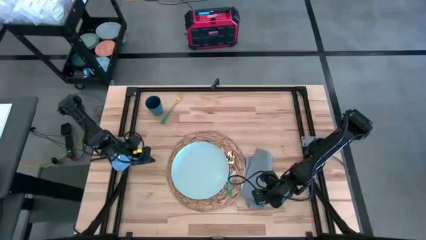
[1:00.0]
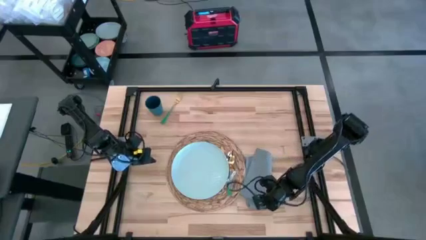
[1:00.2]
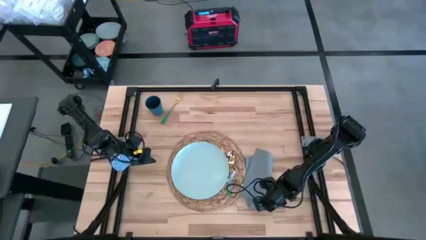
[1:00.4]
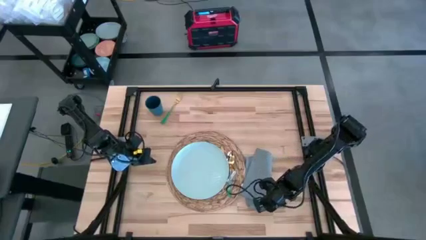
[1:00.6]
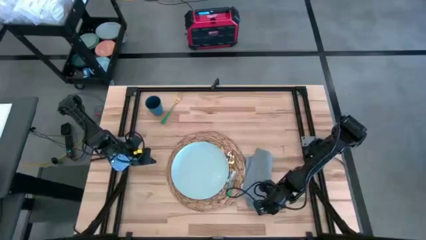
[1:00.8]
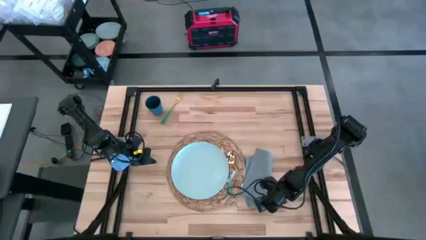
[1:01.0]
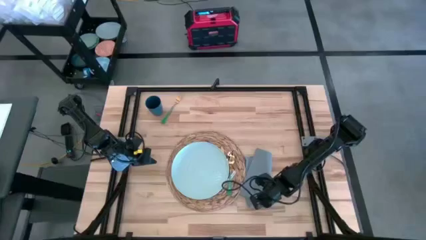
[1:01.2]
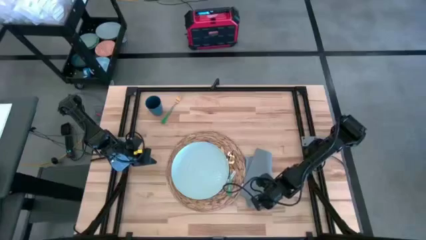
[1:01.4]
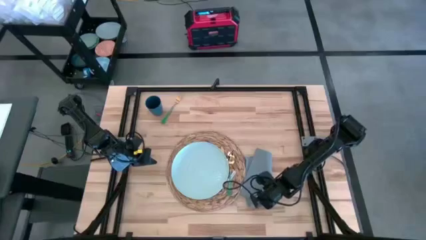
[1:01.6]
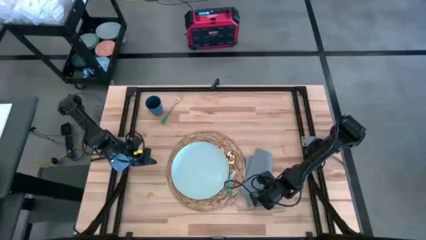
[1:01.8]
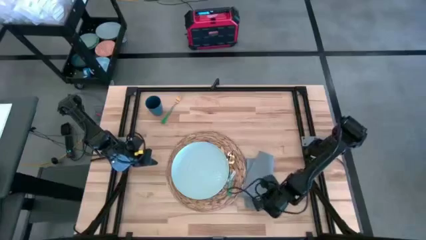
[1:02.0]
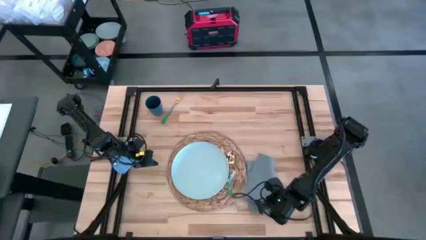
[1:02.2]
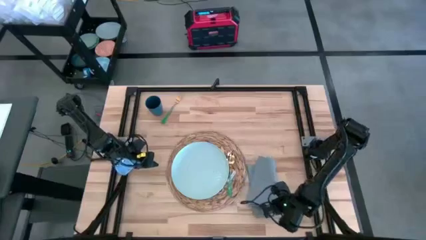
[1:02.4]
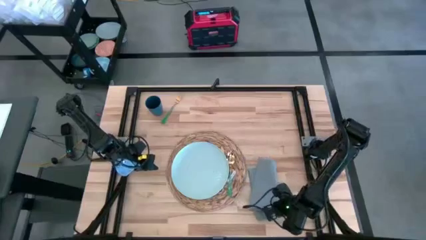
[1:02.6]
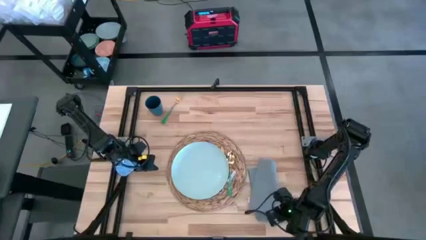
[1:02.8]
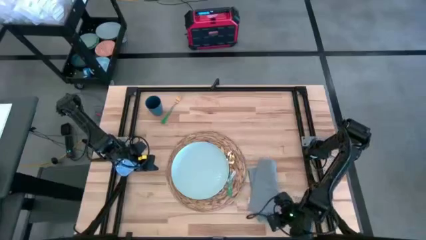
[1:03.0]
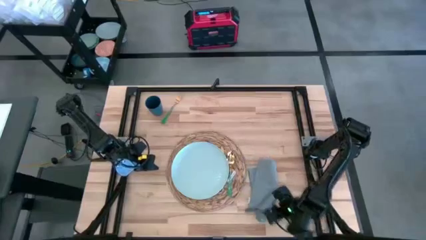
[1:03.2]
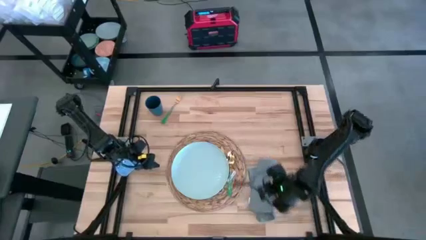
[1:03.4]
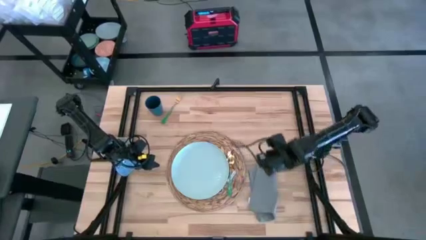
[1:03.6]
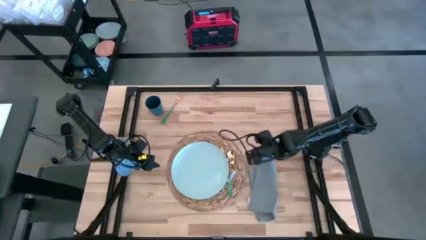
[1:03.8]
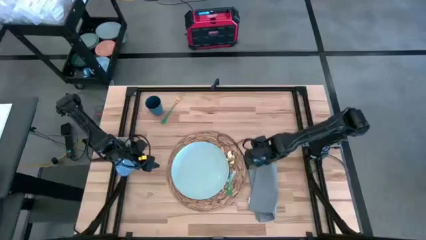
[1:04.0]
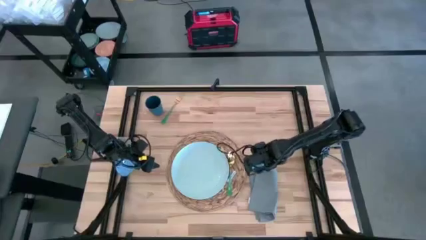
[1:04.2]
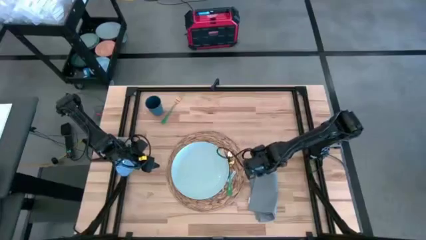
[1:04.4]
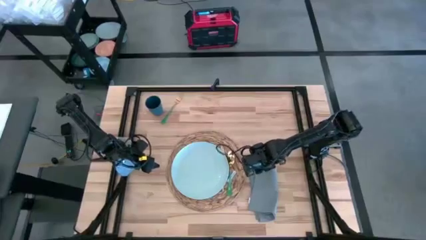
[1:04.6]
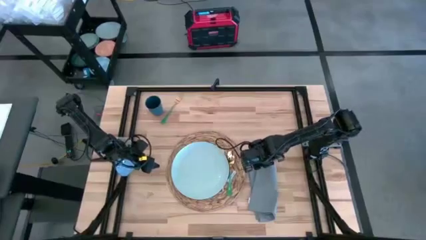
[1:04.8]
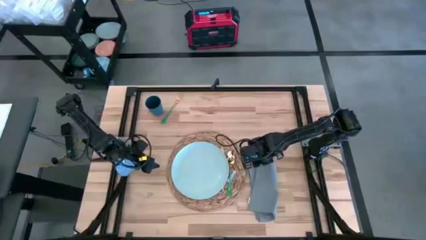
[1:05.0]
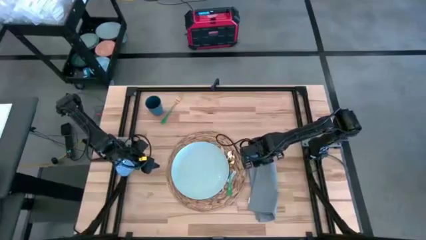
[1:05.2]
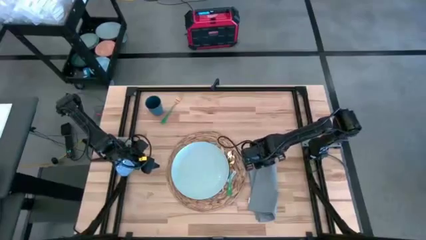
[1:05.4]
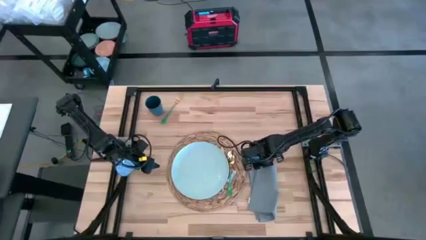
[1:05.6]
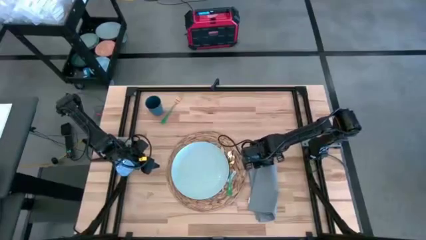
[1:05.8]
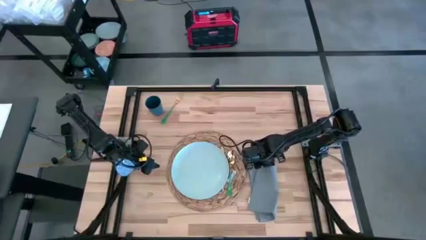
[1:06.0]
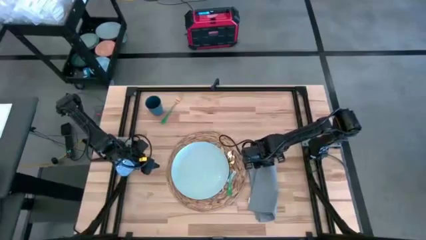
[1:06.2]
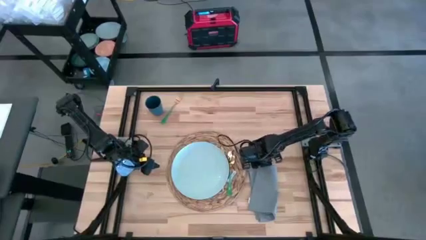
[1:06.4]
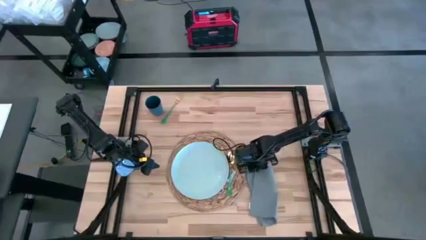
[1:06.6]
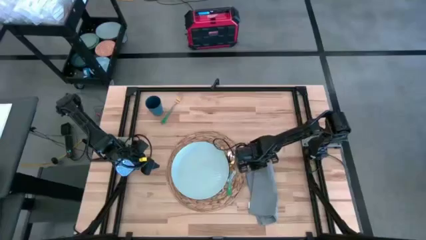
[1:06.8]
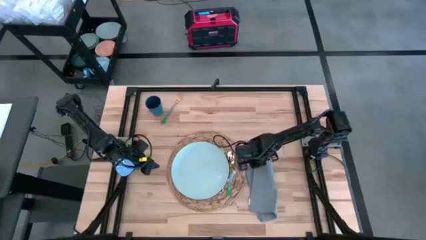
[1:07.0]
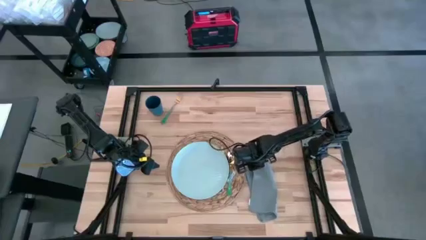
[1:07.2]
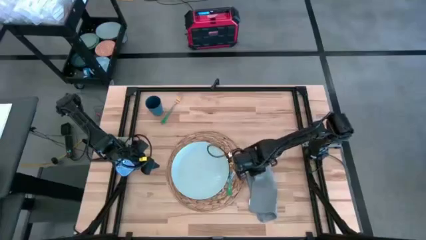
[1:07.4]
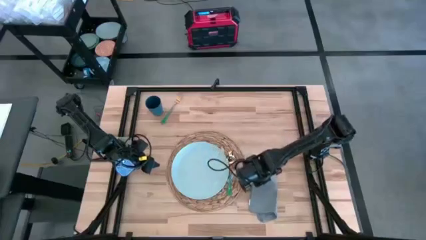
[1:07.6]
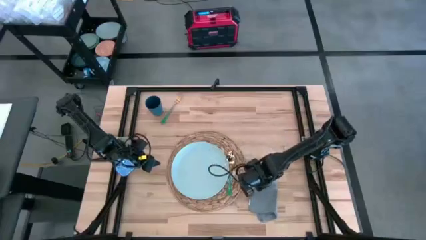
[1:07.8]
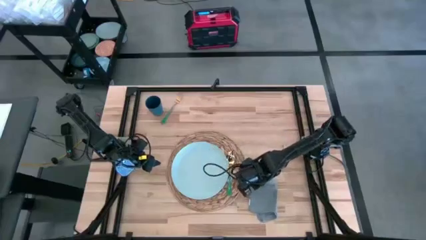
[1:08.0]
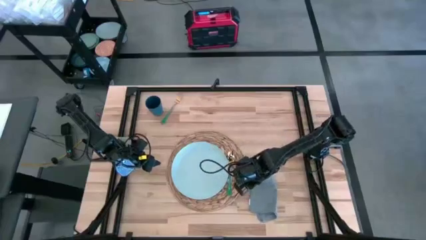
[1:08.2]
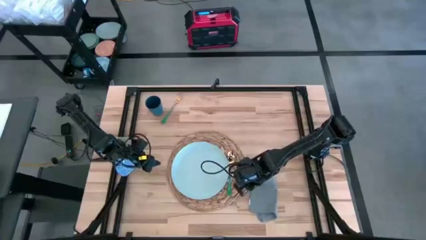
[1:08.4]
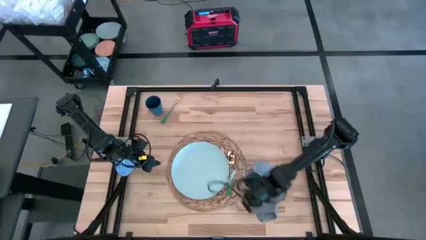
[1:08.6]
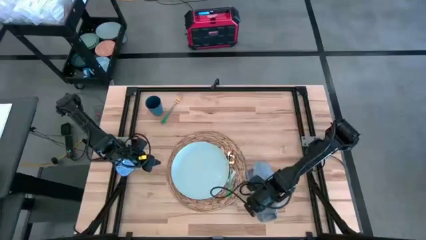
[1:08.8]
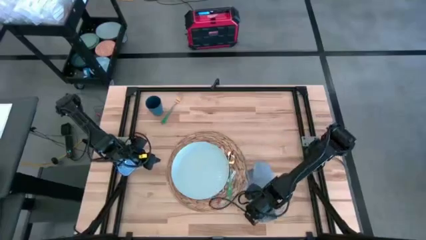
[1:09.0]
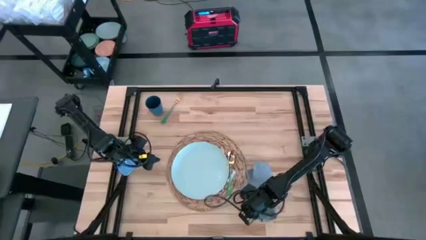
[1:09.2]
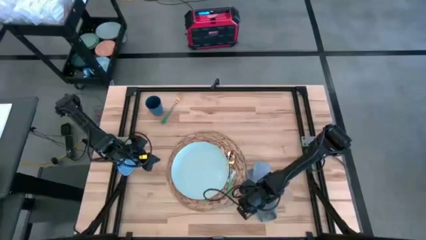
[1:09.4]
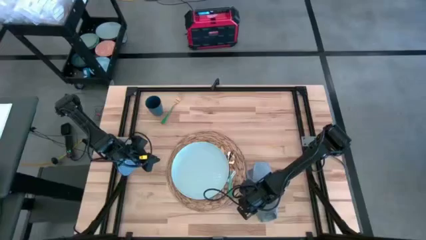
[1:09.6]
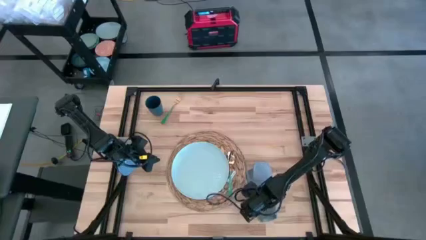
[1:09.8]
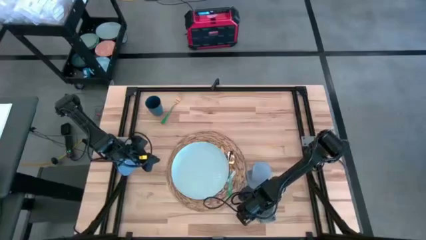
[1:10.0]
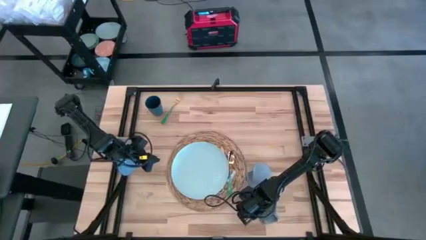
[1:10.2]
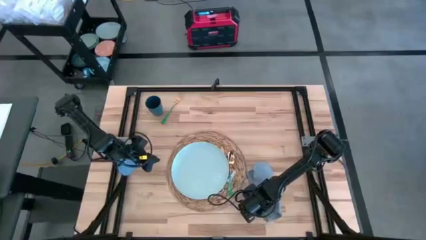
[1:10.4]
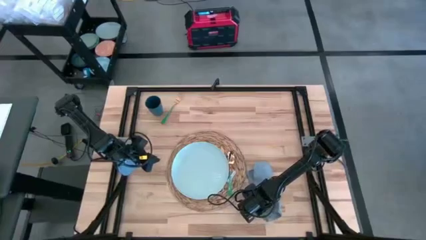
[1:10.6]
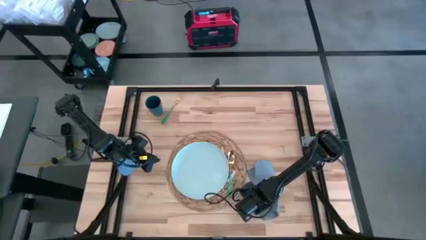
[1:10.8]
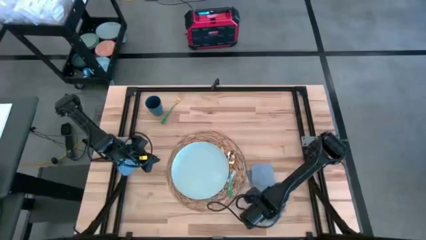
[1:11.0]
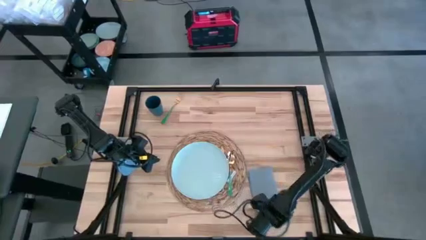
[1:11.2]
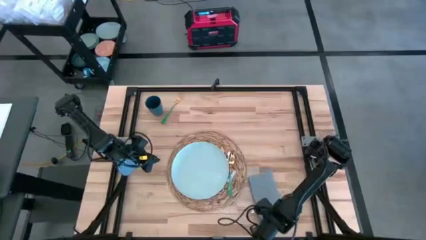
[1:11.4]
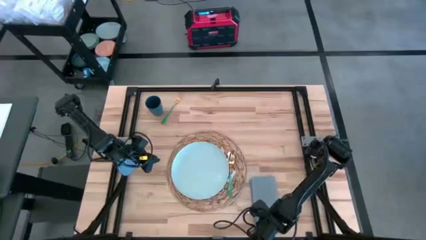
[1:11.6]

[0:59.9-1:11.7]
Task: Set table place
Fold the gray table napkin

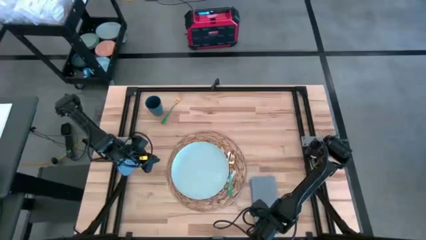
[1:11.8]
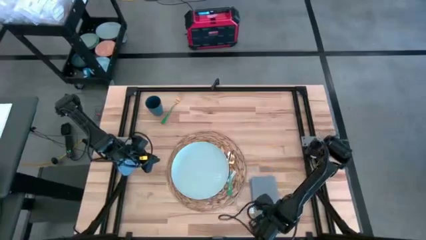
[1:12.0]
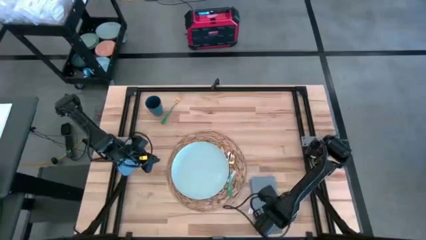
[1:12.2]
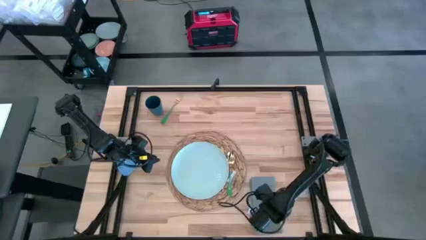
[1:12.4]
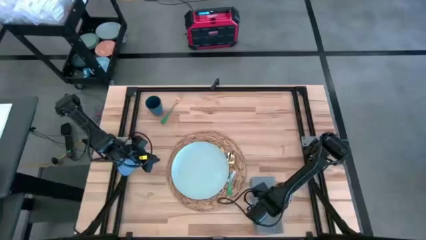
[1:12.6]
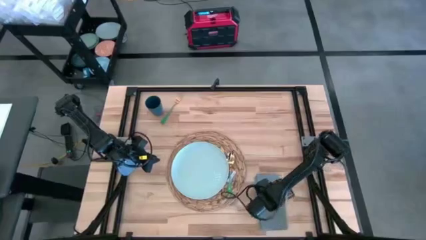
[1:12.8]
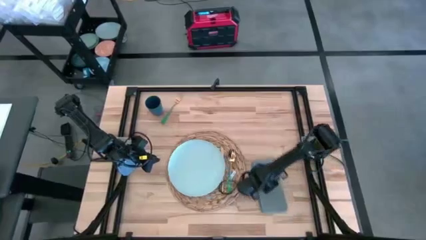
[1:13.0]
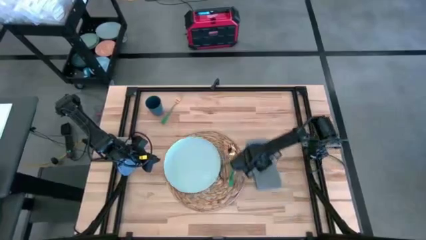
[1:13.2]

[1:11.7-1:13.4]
Move the gray table napkin to the right of the green spoon
